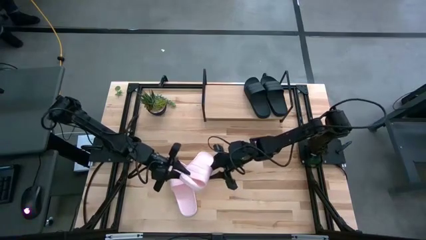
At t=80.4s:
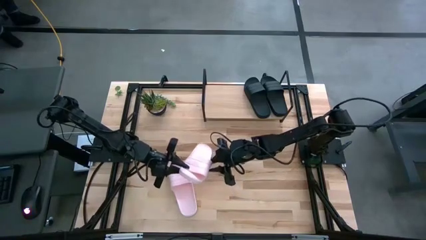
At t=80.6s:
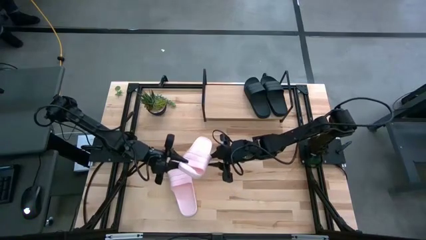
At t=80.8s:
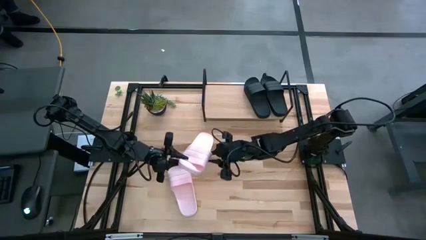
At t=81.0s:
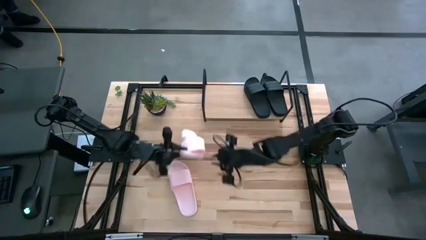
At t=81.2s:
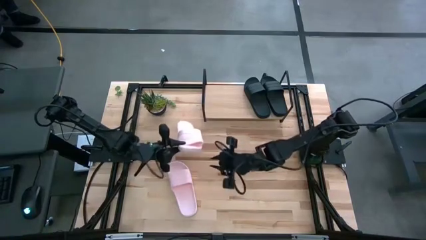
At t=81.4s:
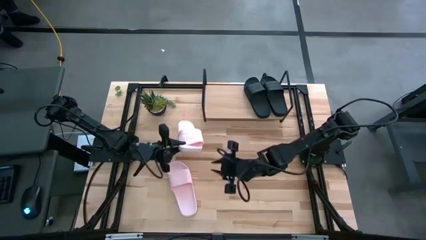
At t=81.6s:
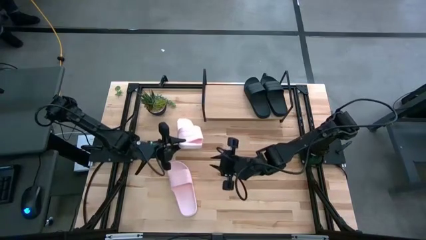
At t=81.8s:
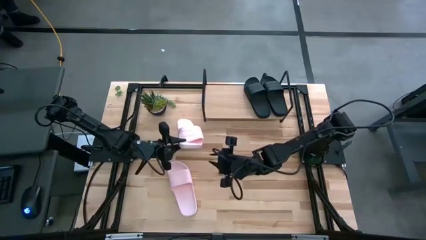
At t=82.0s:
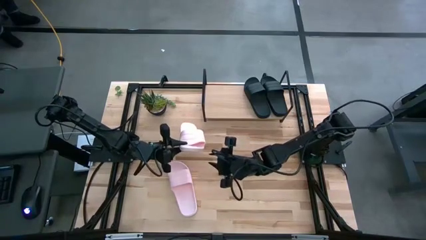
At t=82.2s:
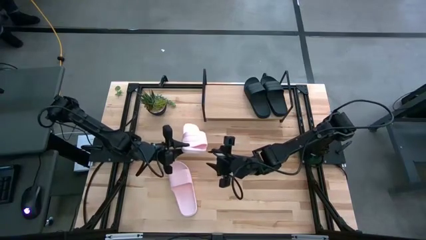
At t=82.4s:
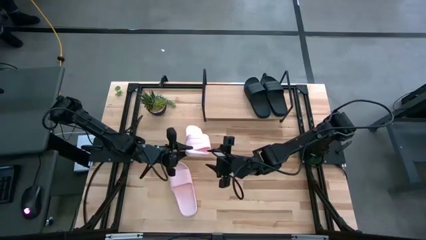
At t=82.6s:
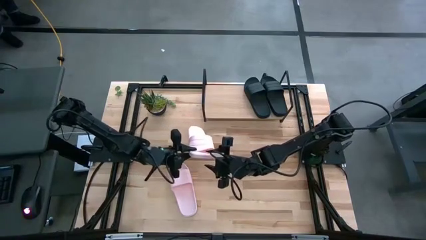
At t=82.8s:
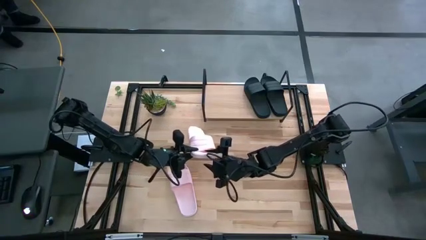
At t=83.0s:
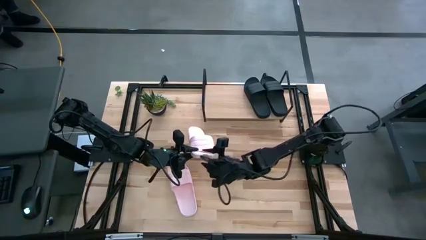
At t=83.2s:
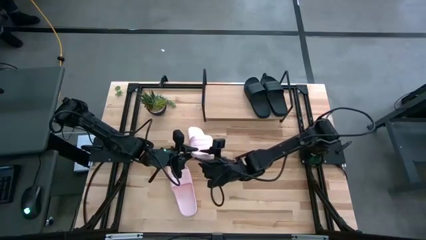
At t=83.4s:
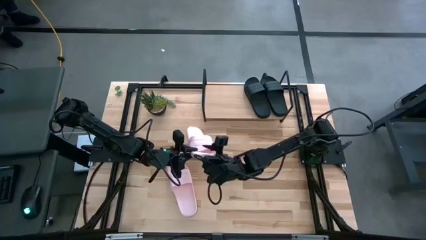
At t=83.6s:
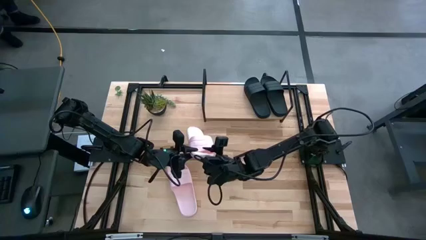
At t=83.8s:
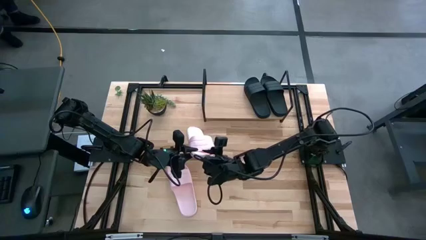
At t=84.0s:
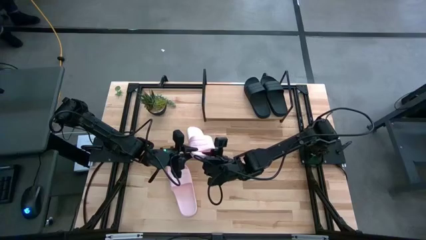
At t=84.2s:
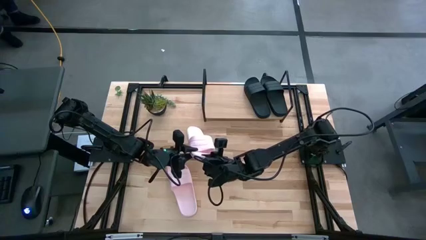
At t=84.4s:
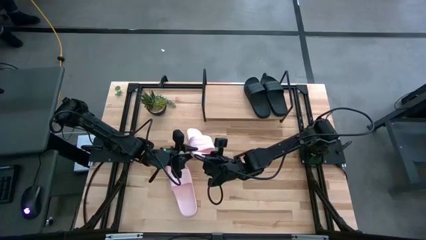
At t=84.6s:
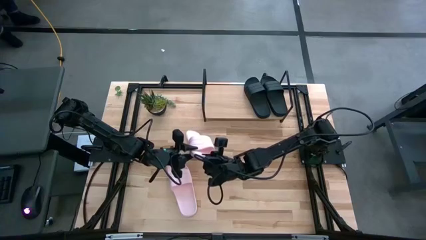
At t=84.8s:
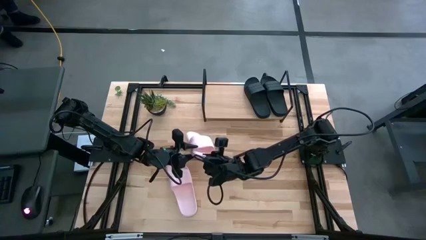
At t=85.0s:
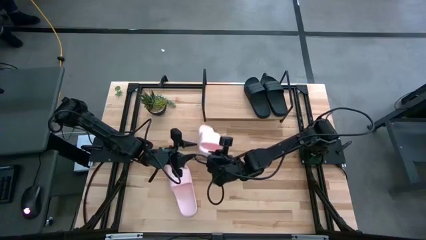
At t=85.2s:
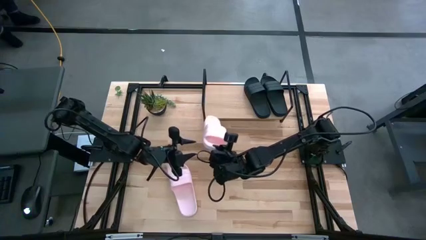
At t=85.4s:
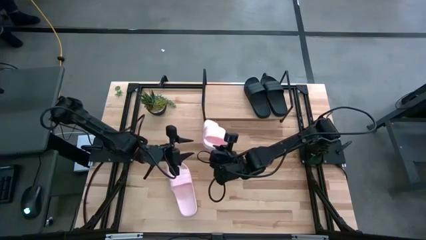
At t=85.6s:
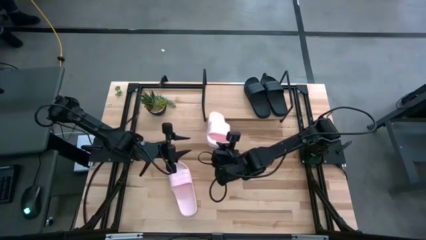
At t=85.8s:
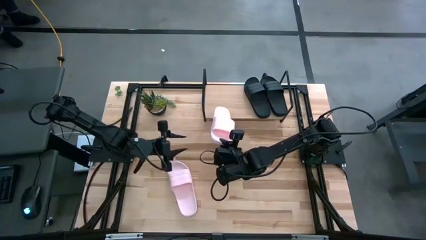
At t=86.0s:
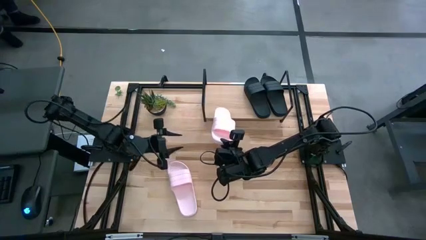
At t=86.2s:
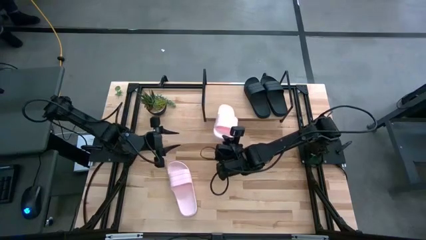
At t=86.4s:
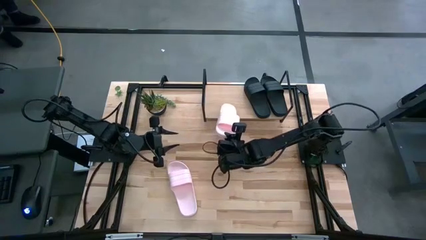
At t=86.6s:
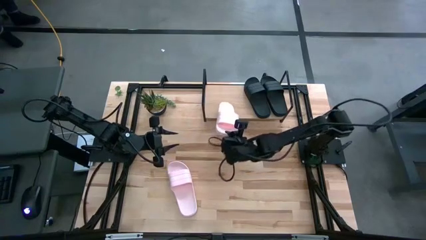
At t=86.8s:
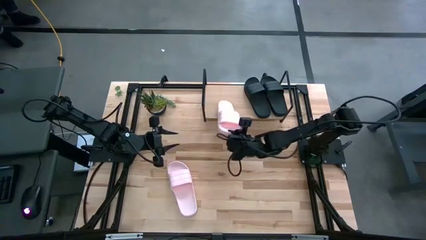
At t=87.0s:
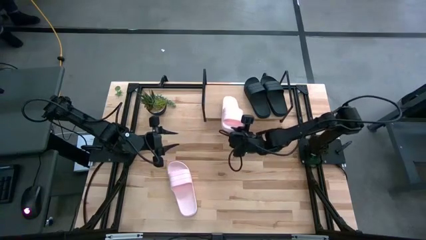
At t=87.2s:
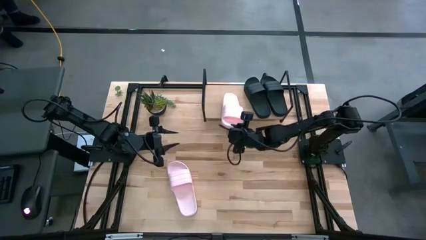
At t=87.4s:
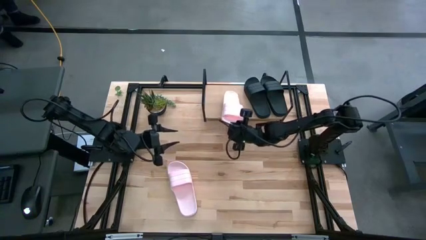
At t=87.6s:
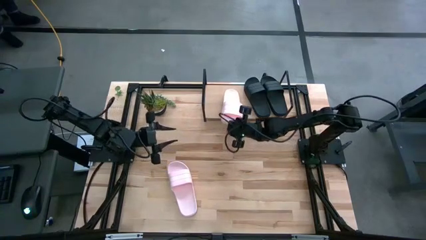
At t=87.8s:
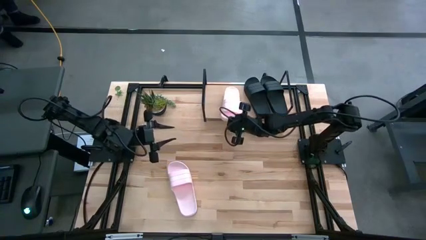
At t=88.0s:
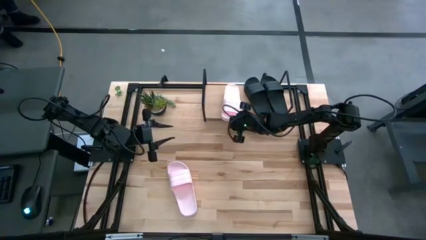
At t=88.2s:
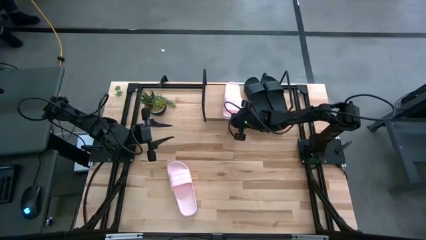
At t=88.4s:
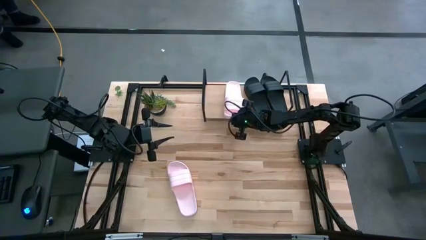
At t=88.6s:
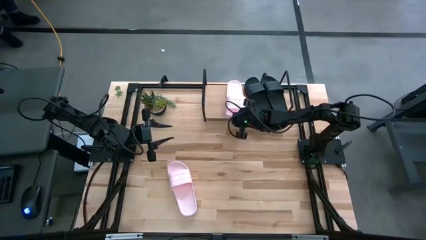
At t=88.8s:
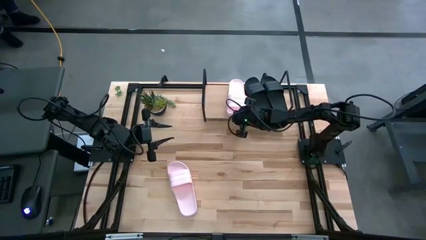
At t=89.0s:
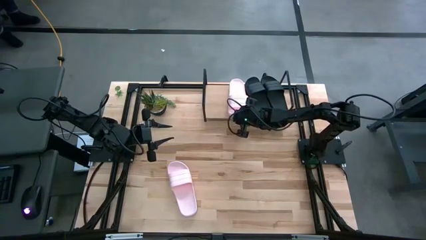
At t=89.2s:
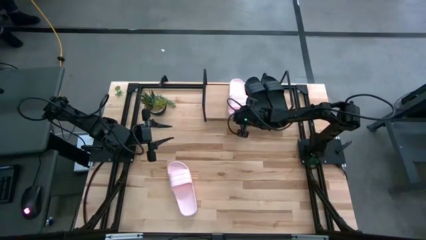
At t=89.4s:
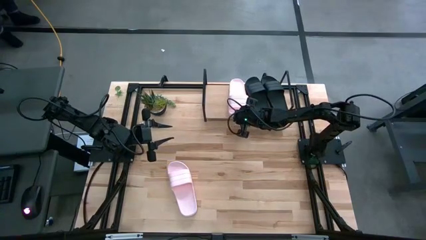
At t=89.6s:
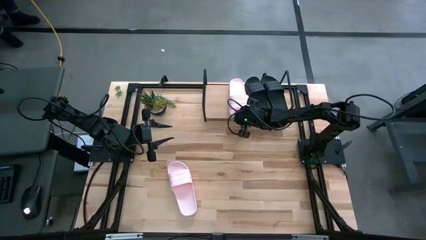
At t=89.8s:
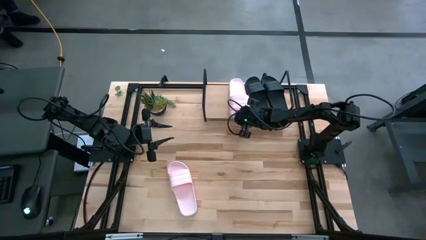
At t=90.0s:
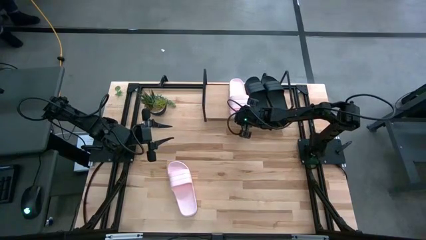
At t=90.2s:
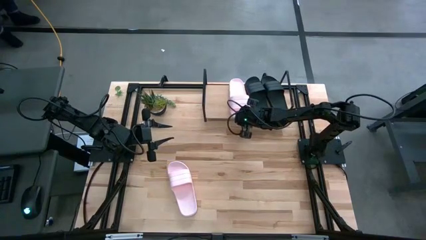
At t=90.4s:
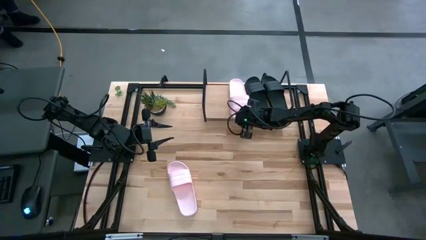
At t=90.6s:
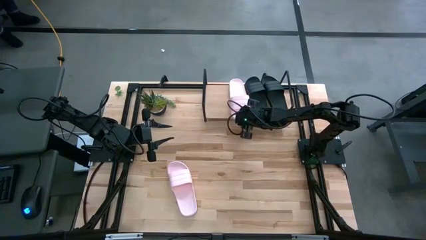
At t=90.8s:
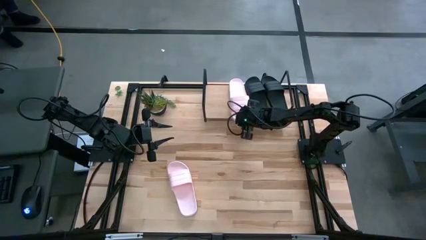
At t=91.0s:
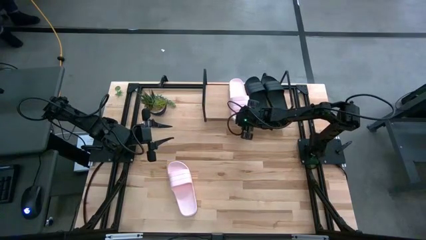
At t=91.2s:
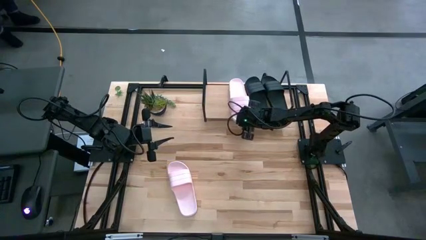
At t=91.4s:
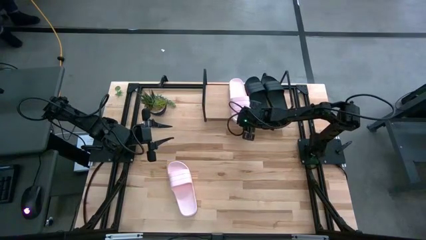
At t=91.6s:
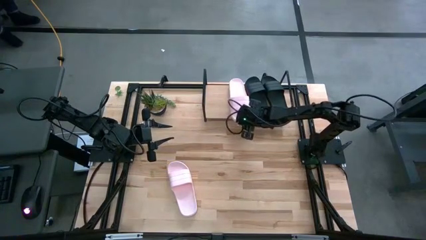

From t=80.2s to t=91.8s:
Task: Pick and place slides into the shelf
Put the top pink slide on the shelf
